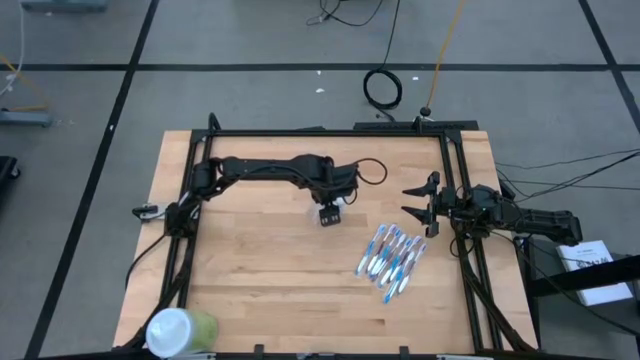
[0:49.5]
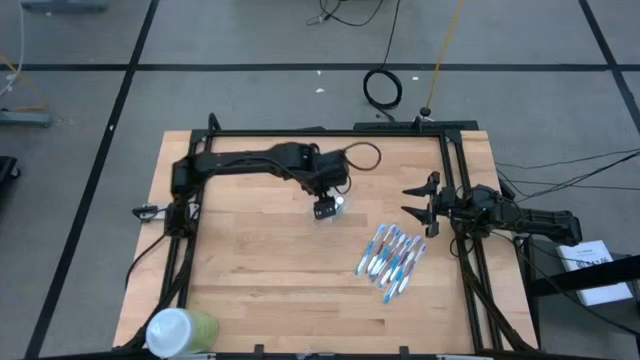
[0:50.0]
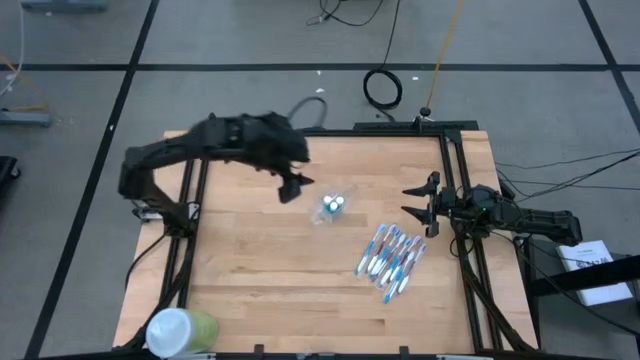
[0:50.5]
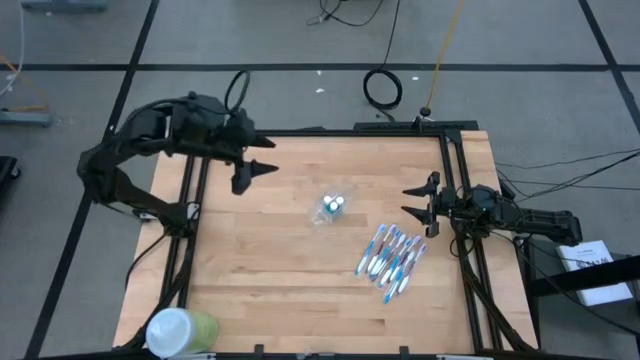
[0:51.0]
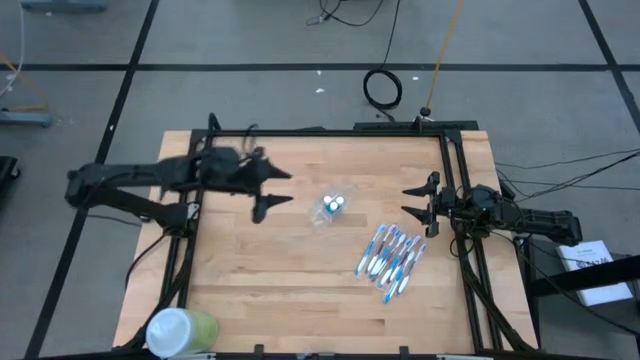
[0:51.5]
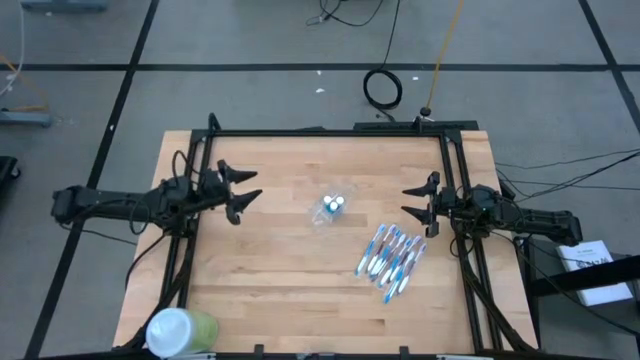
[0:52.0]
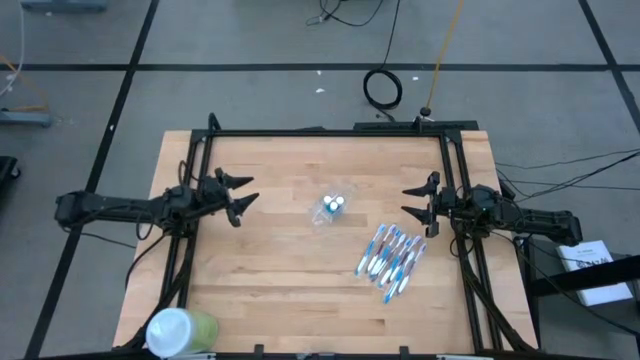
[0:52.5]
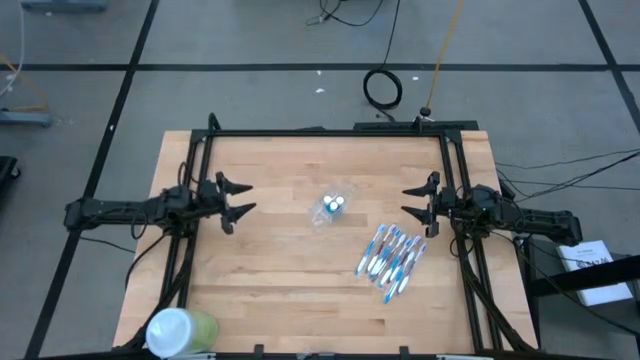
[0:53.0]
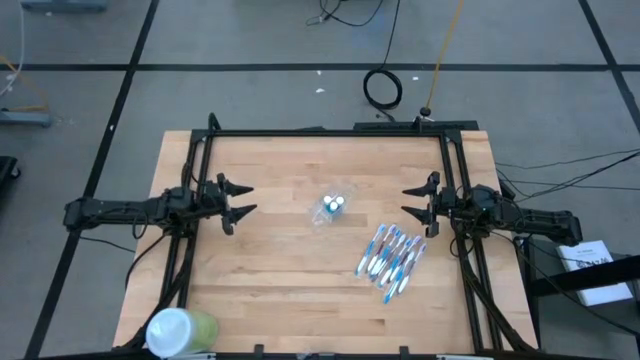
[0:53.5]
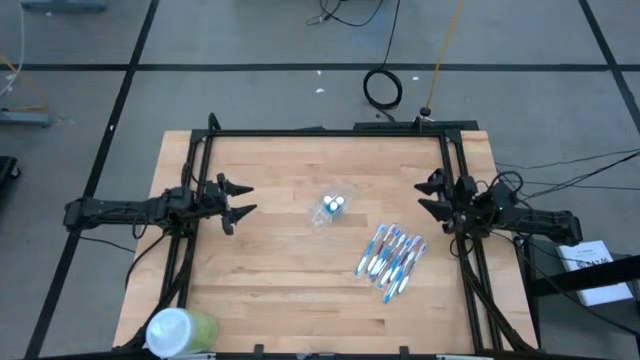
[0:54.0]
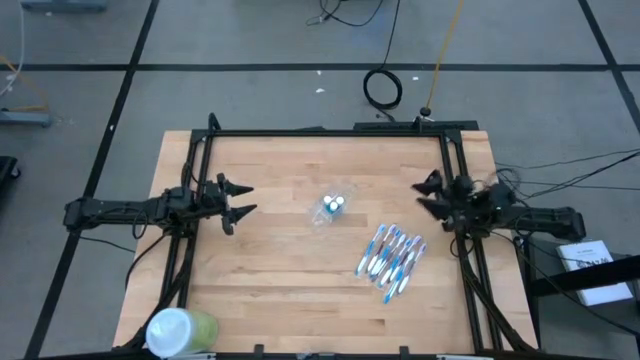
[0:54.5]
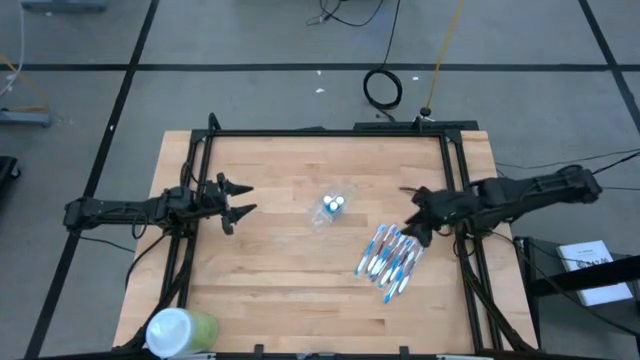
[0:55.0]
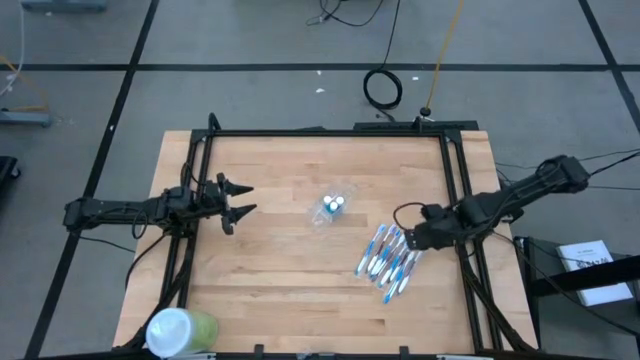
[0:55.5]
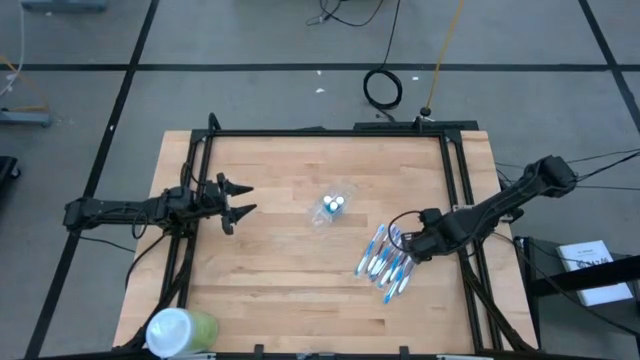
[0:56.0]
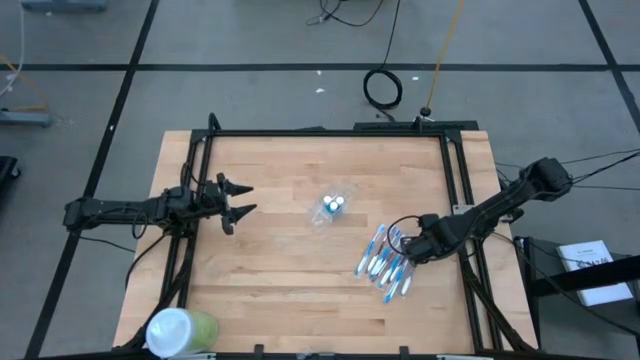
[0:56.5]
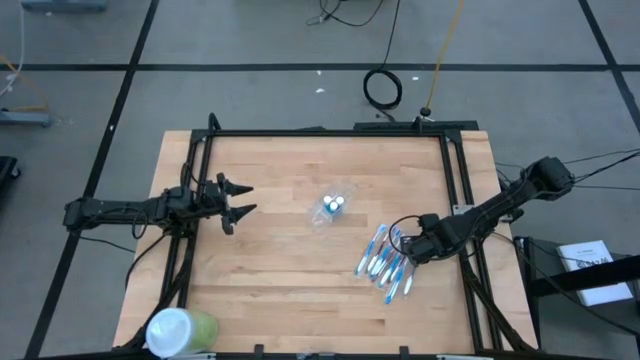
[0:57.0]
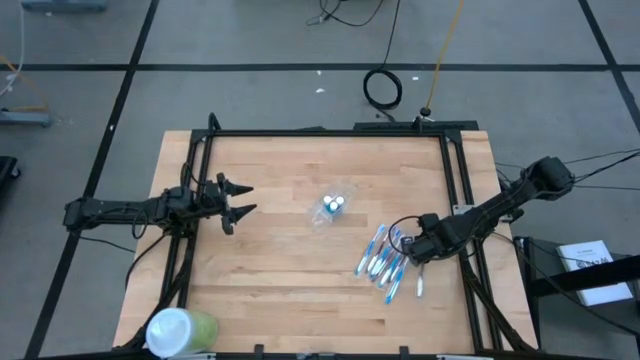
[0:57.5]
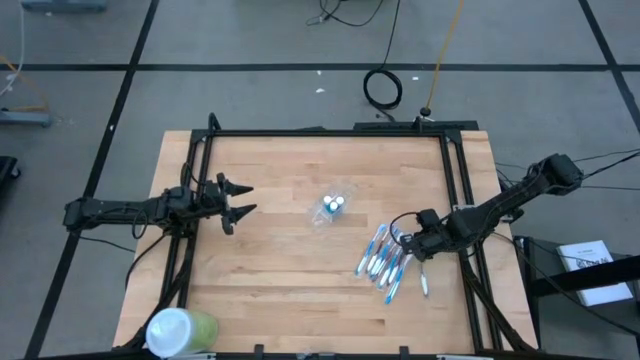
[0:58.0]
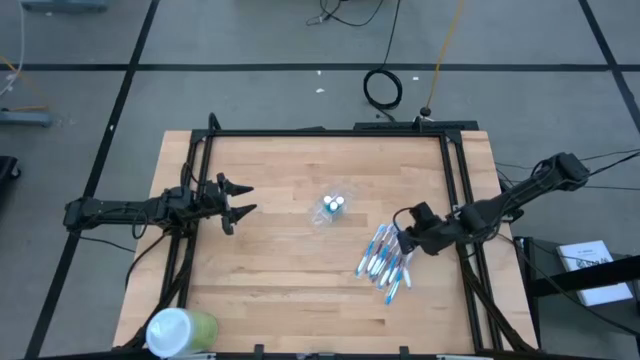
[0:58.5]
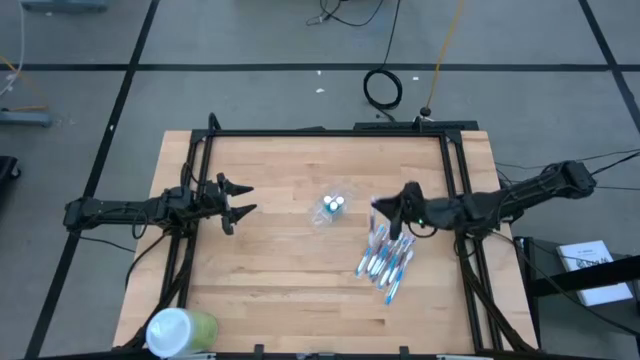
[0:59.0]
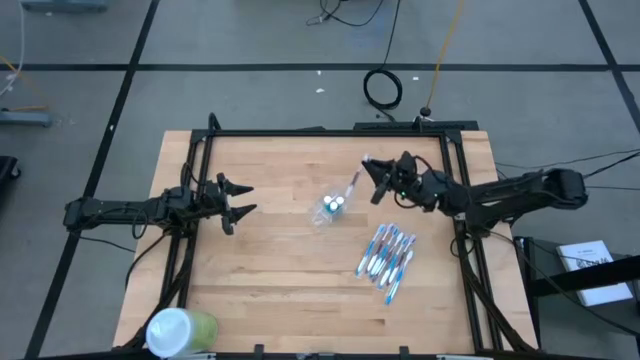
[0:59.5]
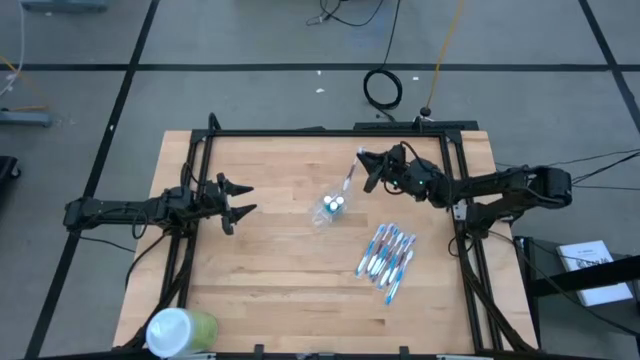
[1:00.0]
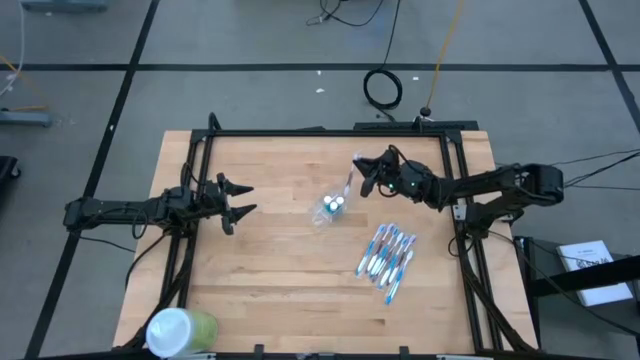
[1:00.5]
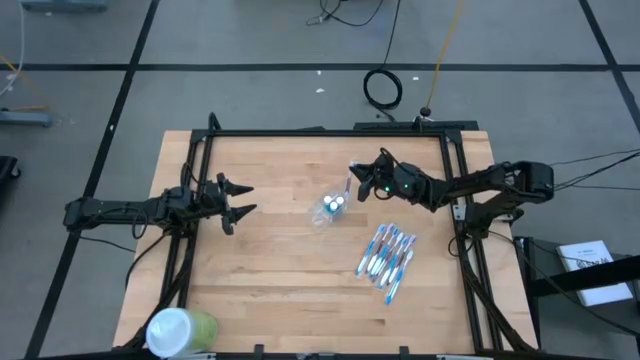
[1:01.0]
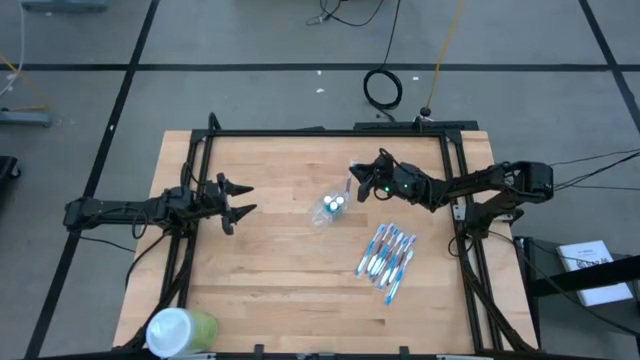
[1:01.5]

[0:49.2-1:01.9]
Task: Pick & Place toothbrushing station
Put the purple toothbrush into the transparent organizer

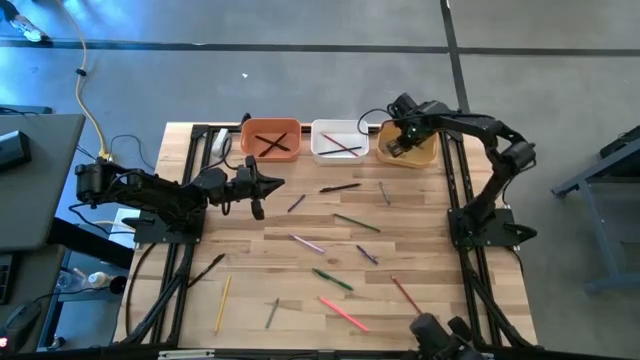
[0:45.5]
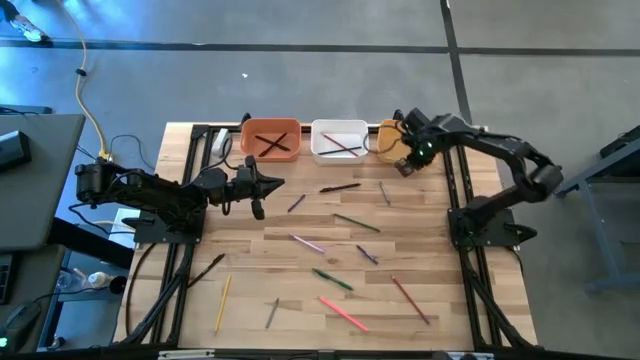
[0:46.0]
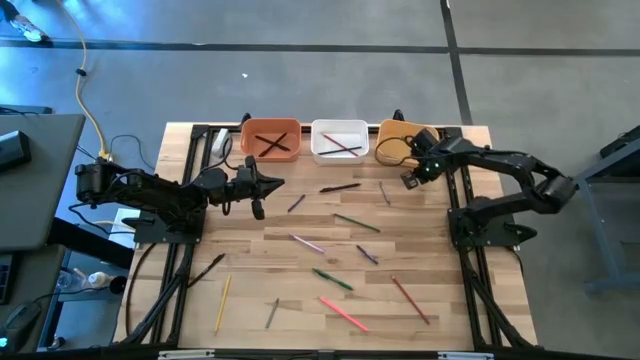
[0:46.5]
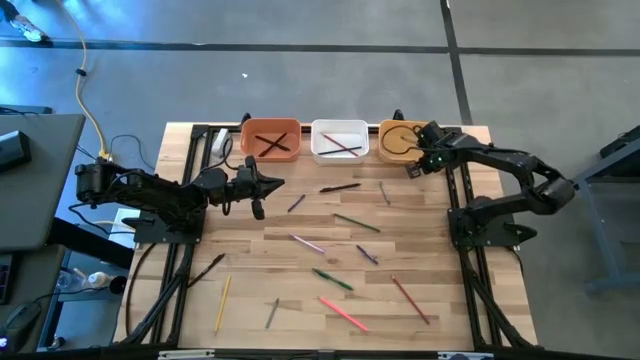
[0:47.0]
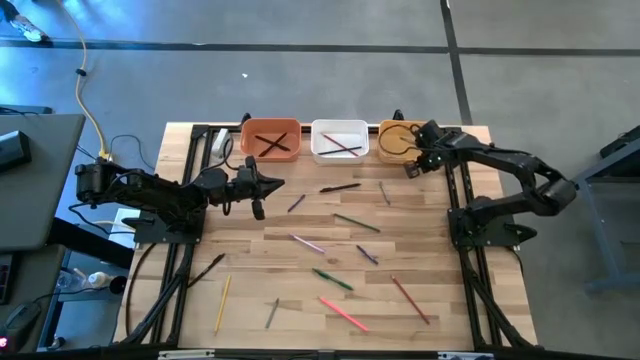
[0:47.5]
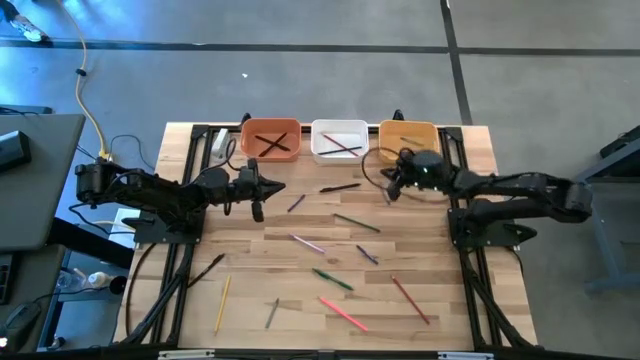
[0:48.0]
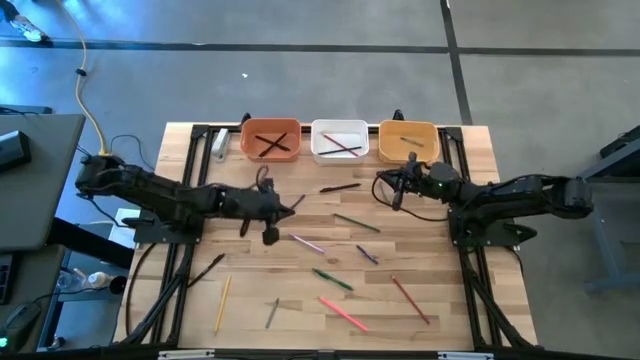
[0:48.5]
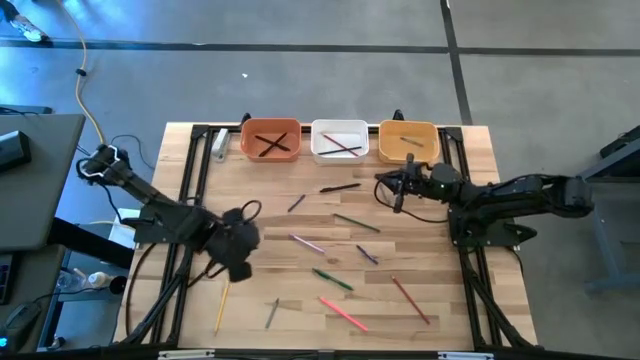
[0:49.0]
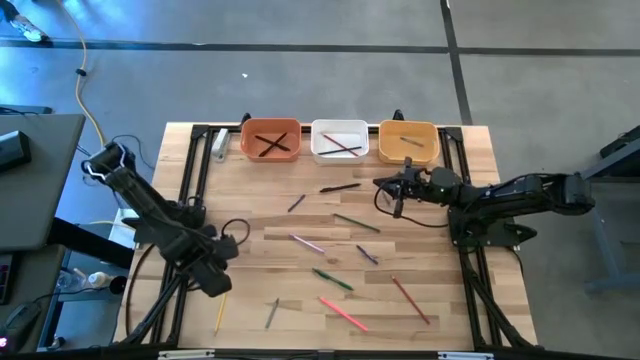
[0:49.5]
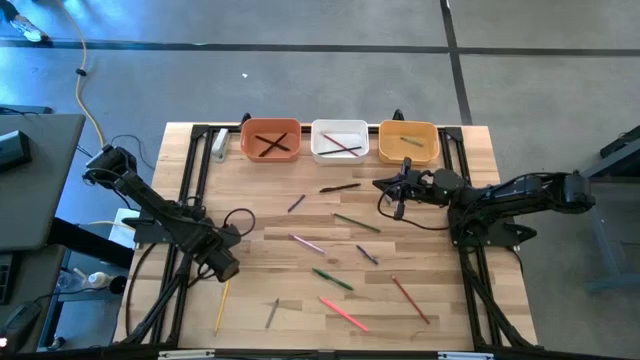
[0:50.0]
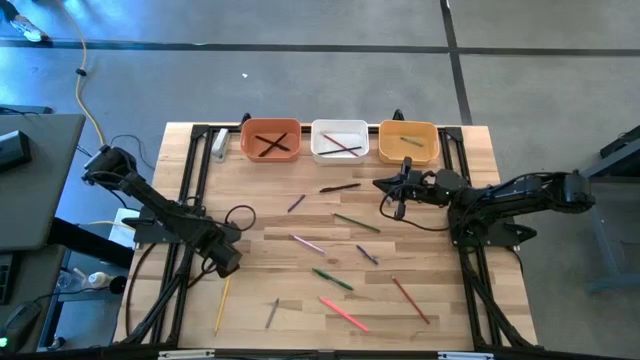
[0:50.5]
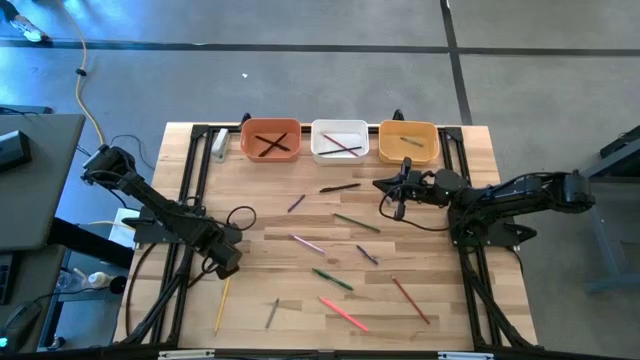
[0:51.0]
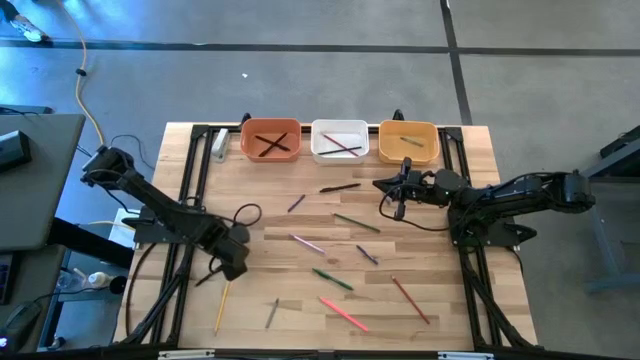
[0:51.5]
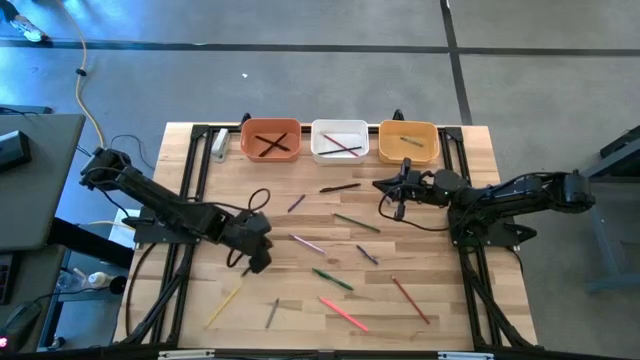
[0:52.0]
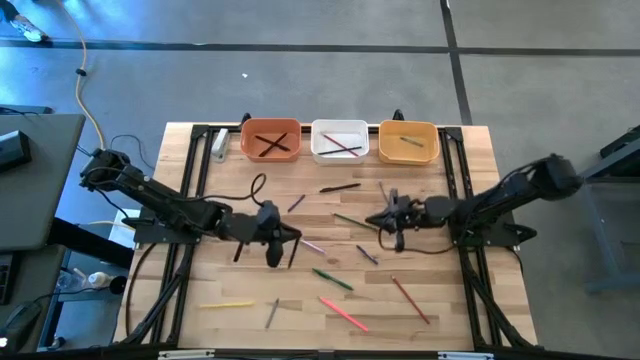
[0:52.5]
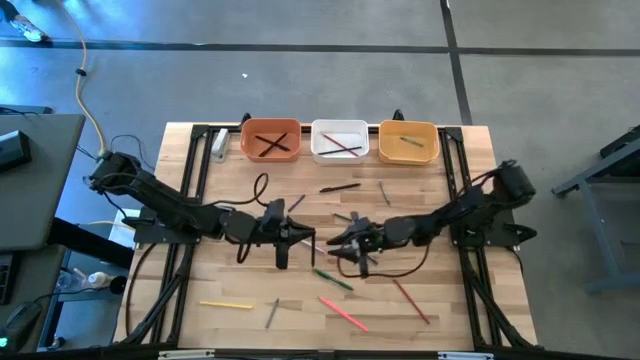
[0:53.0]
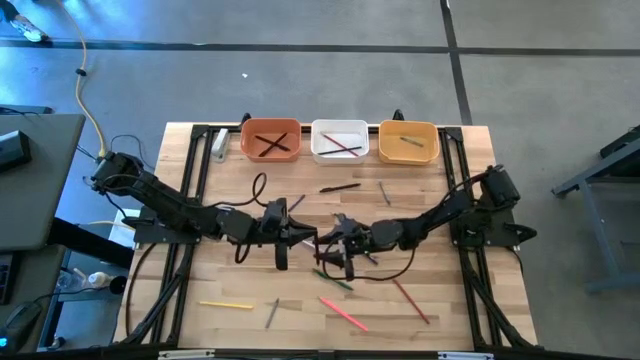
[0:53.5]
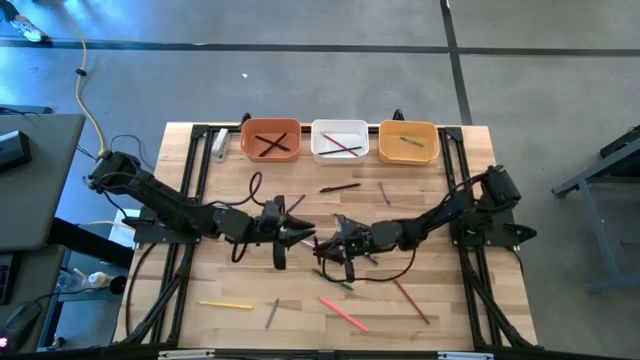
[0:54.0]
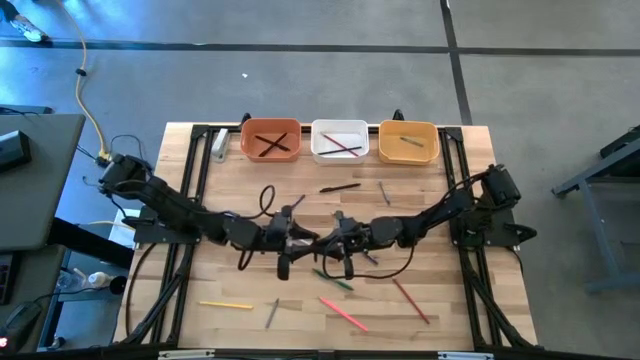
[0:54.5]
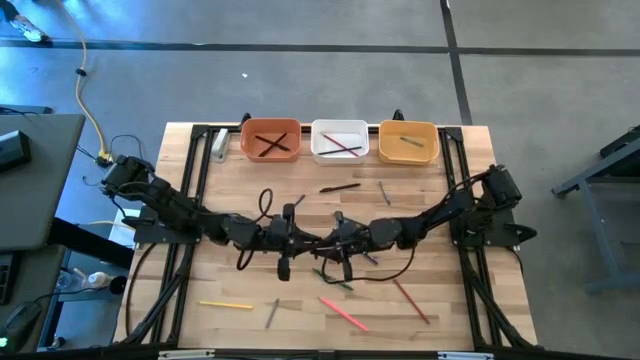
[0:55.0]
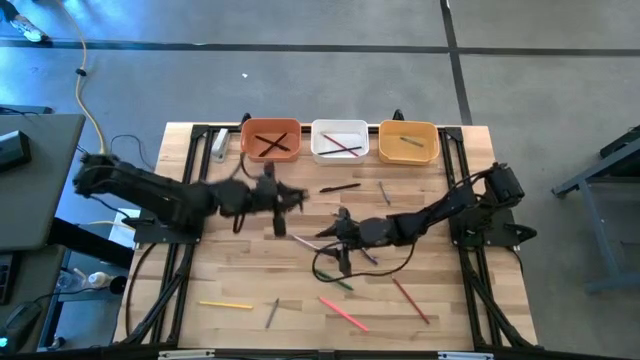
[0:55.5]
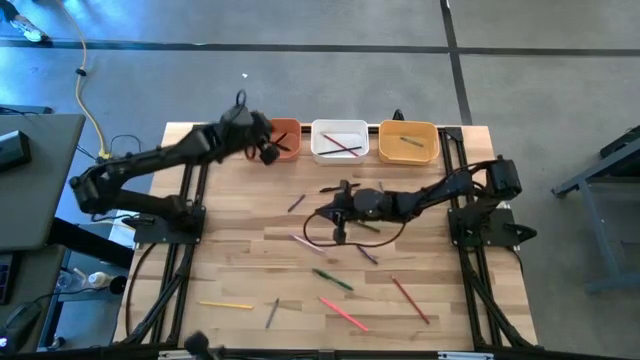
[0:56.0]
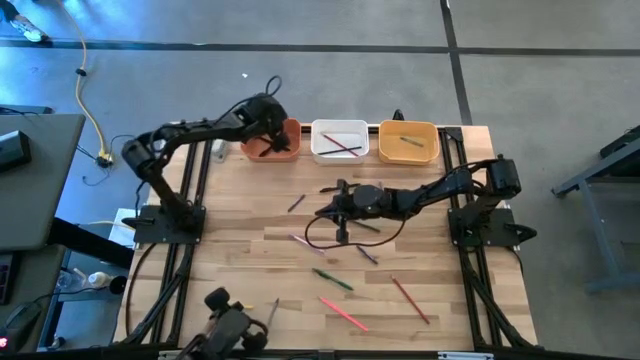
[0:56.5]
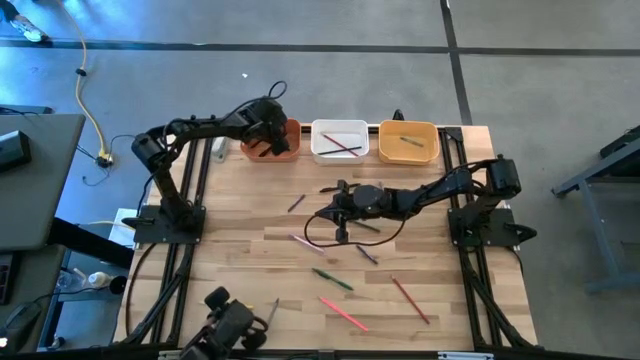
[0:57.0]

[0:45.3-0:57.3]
Task: Sort crayons/erasers/pens/pencils in bins
Put the bottom black pen into the orange bin
